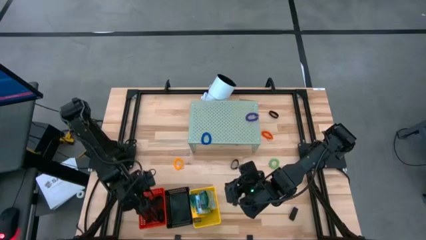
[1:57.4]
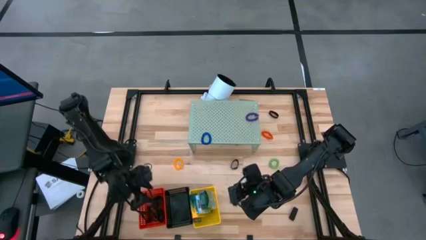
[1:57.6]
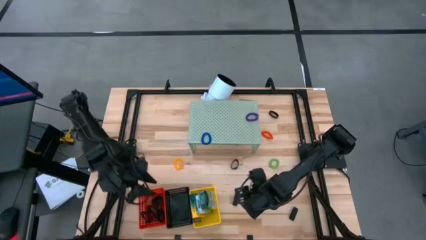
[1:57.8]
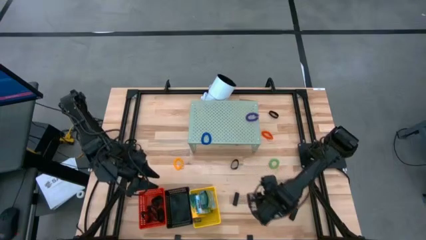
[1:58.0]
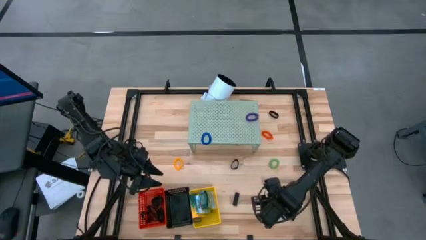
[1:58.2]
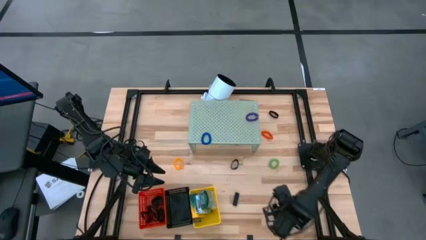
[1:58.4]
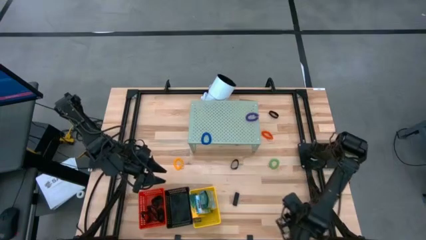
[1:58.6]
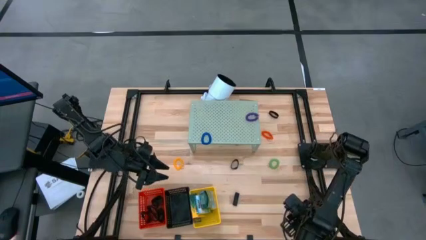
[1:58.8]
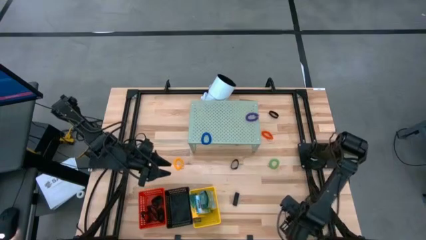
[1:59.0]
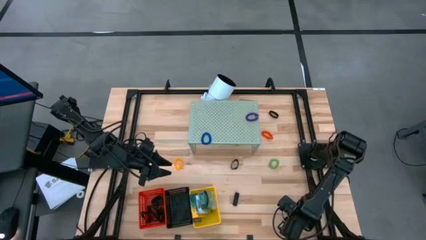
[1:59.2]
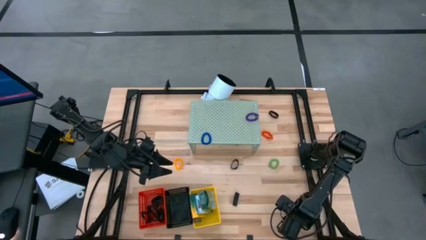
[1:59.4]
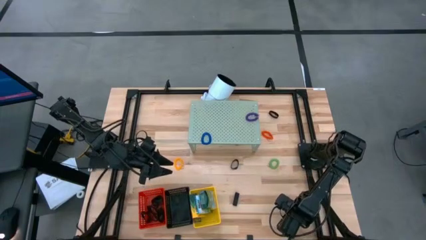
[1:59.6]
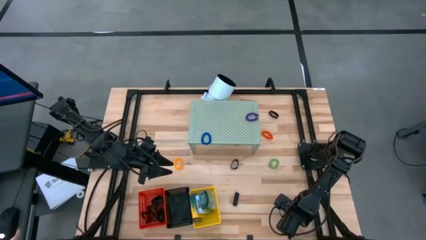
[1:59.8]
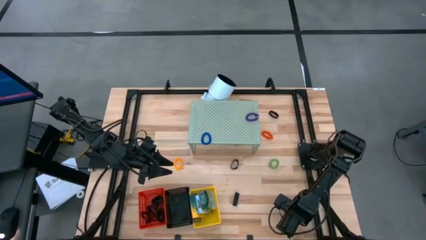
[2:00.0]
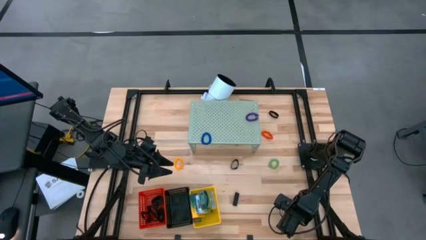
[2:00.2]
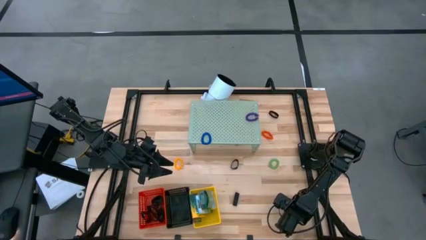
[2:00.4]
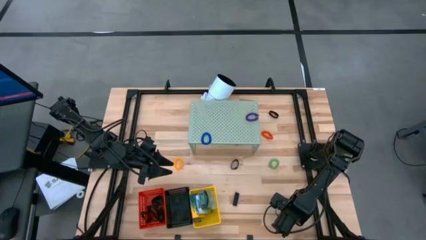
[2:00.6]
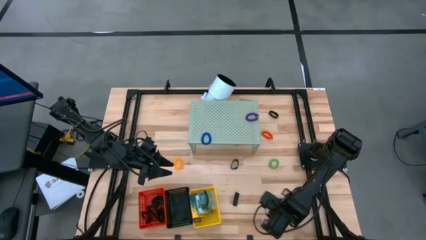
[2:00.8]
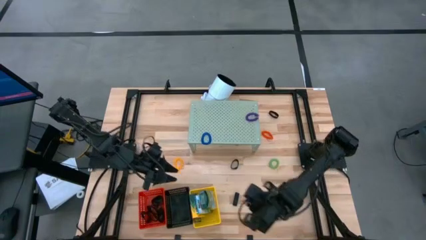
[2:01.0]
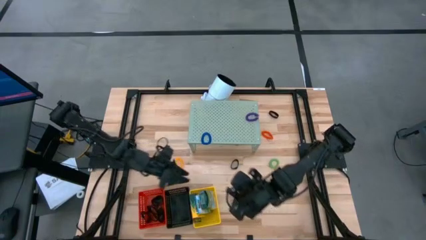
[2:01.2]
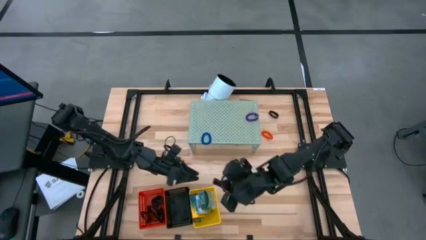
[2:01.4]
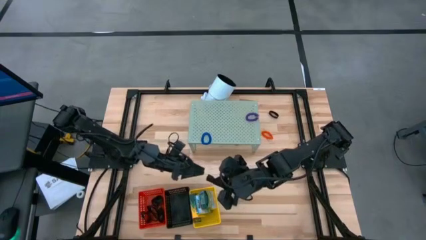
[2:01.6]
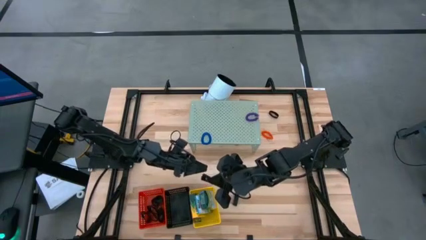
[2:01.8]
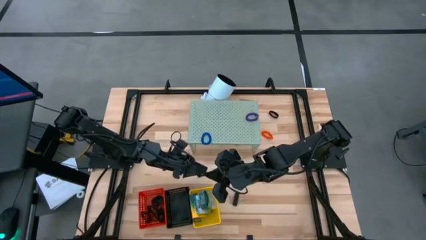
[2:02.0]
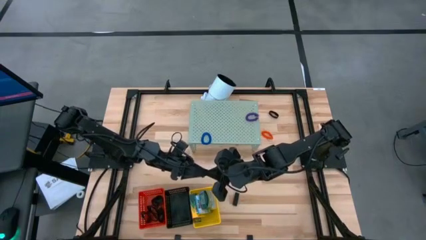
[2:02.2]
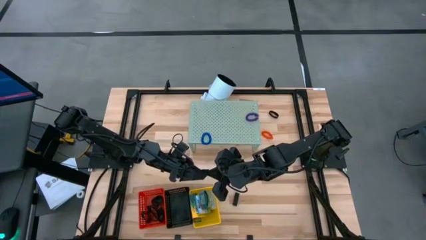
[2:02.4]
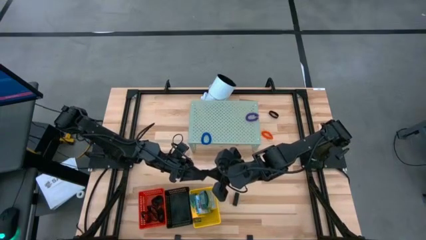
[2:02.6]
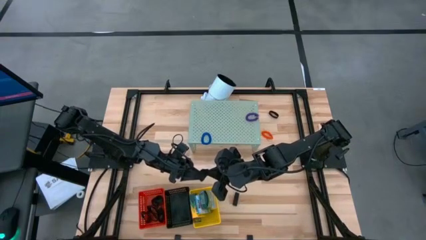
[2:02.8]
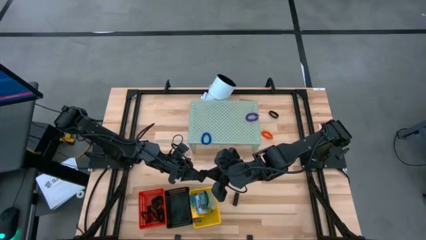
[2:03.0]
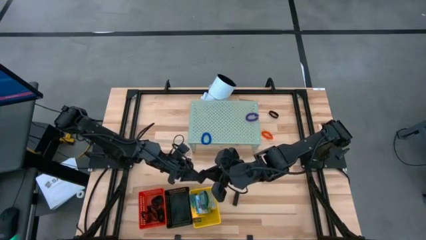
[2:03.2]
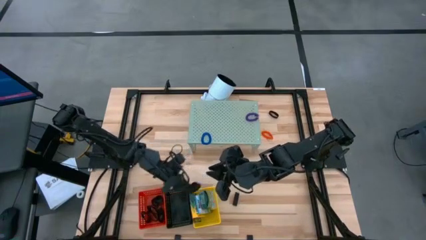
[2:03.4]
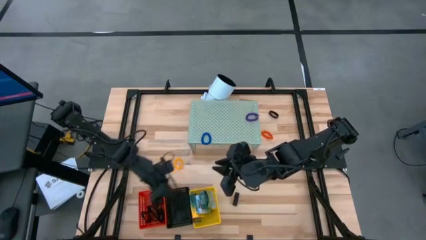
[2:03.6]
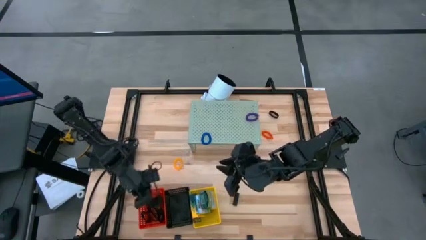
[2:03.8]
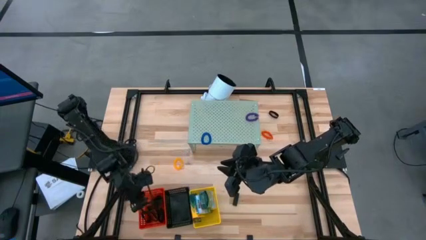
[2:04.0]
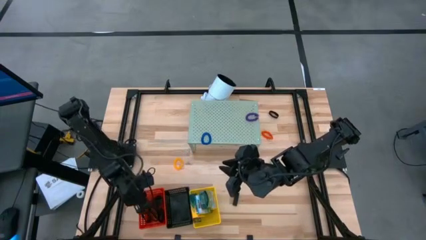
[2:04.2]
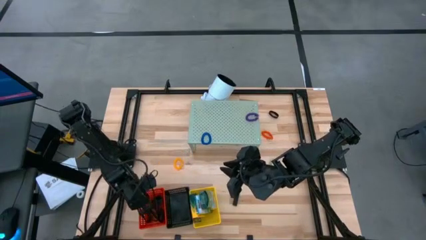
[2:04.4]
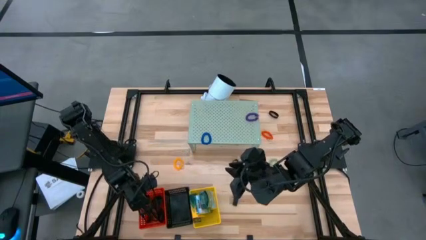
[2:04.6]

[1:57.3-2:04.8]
Task: Pick & Place Office Desk Supplies
Put the black rubber band into the red bin

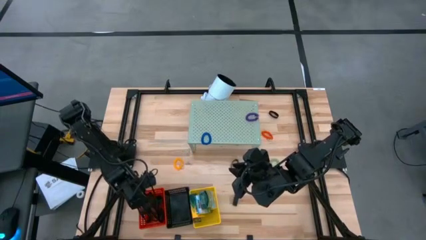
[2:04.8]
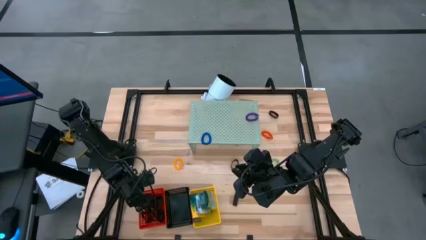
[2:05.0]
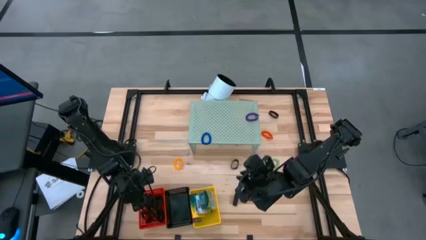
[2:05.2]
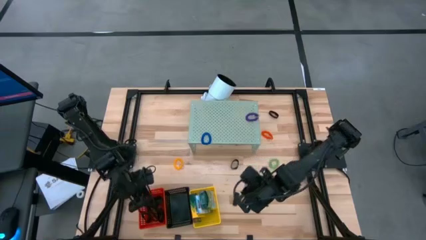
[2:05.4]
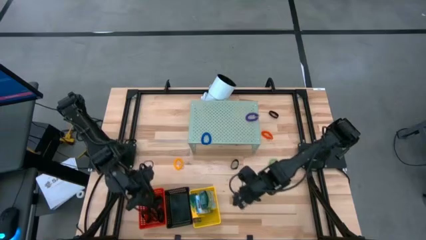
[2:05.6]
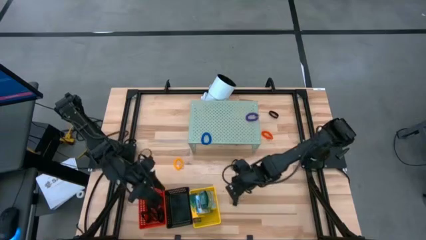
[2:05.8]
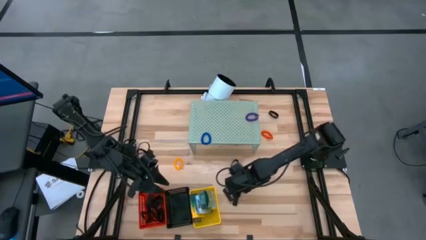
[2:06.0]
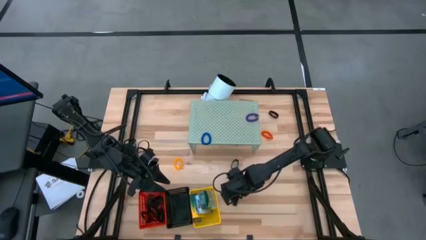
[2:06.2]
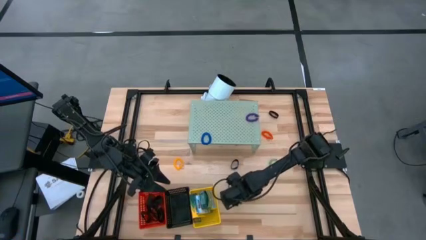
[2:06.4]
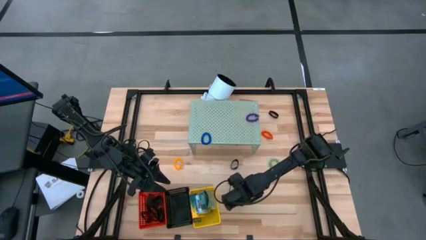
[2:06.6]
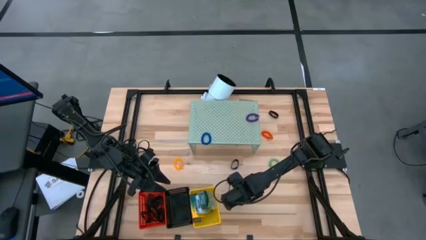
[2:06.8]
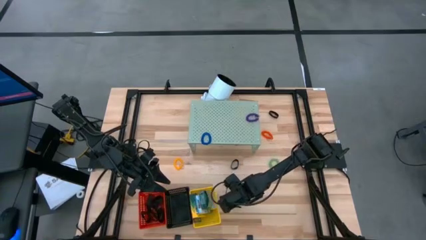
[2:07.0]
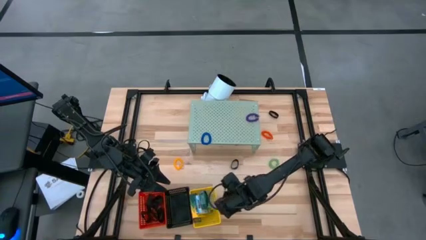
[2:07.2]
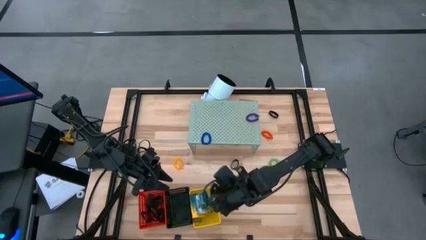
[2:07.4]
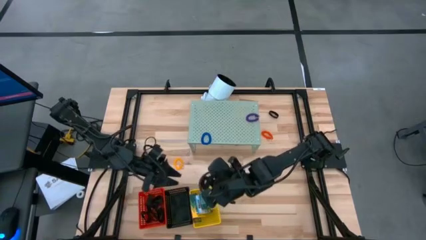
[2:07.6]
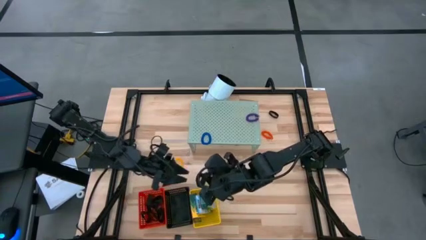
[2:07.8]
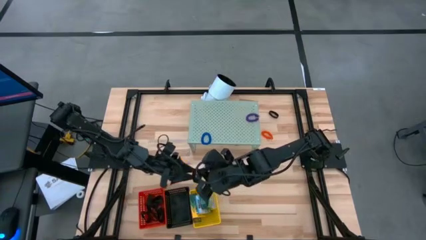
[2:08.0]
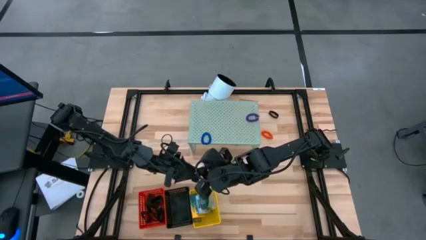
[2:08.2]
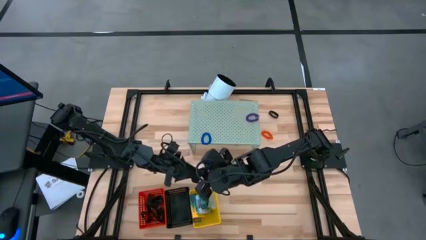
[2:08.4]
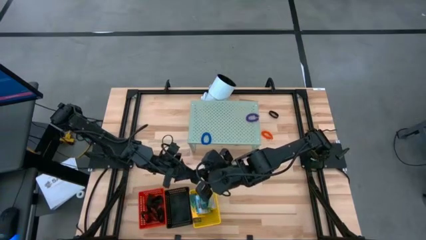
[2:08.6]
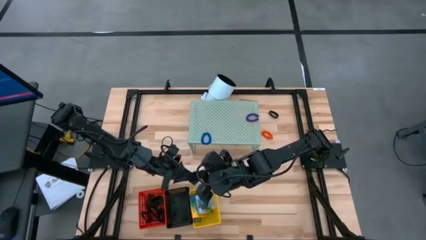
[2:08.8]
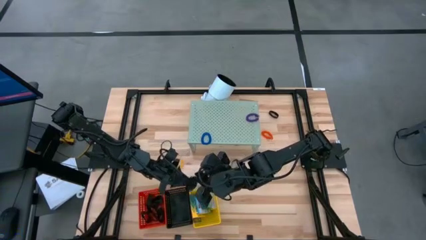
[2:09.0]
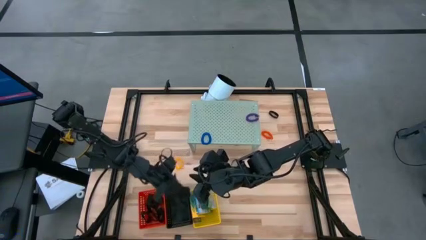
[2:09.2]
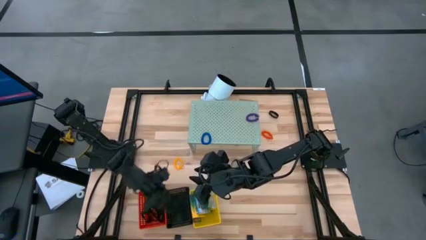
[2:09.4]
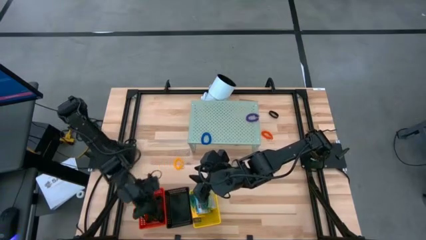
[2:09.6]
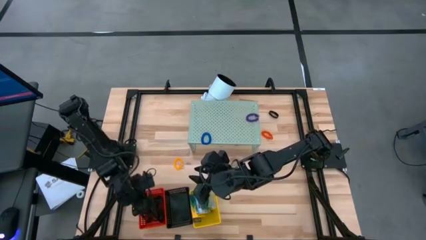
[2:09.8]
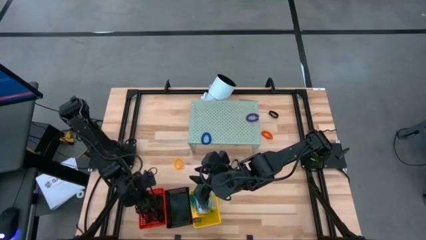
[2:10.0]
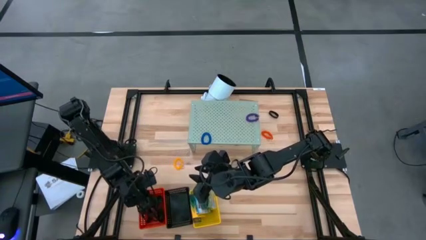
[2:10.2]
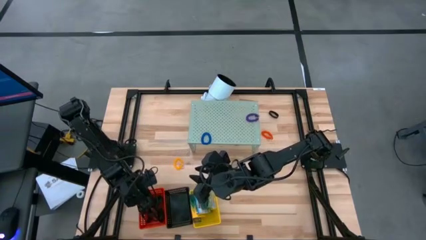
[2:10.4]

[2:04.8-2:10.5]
Put the black rubber band into the red bin

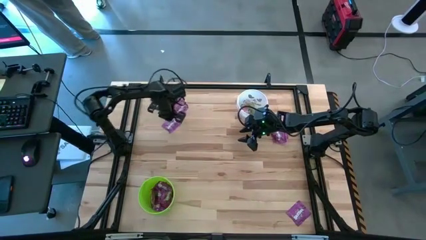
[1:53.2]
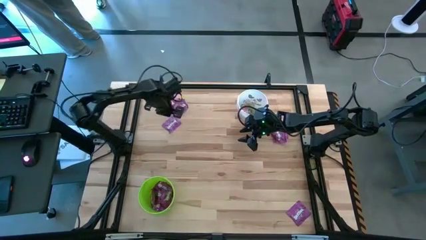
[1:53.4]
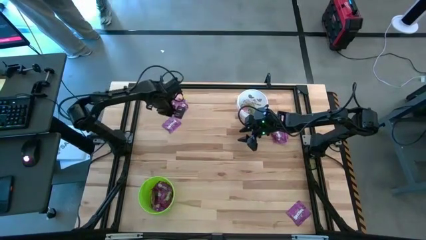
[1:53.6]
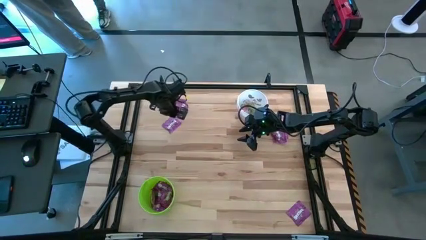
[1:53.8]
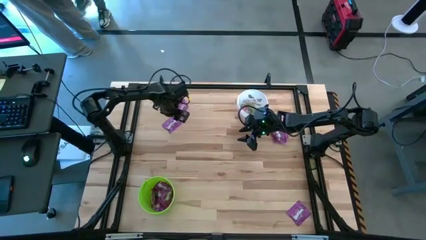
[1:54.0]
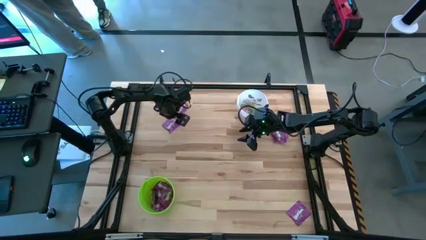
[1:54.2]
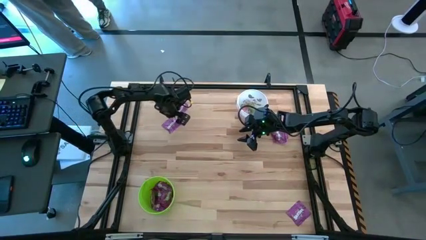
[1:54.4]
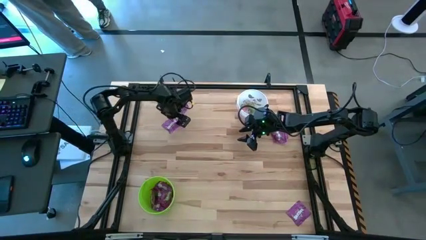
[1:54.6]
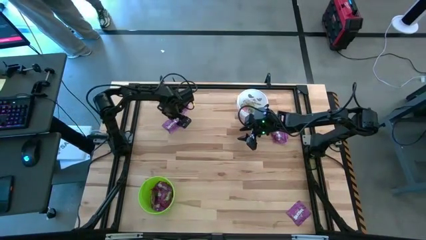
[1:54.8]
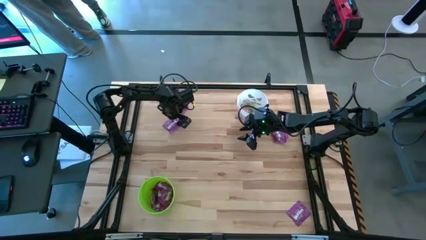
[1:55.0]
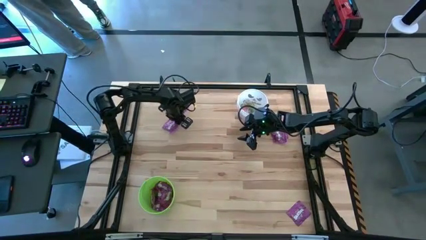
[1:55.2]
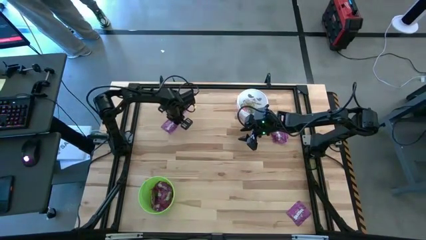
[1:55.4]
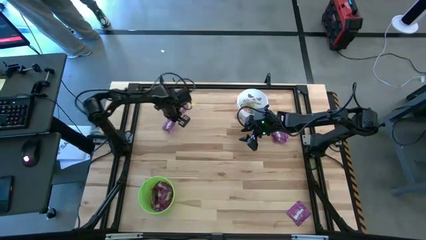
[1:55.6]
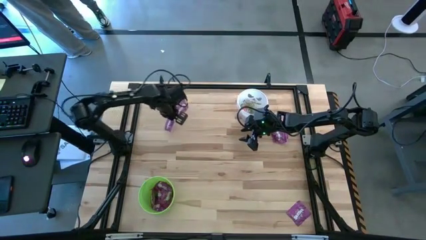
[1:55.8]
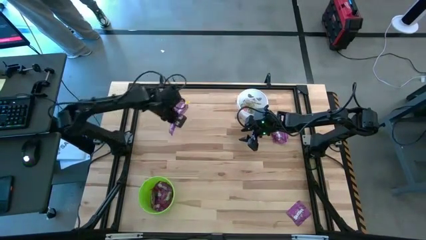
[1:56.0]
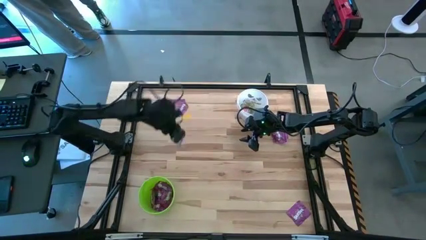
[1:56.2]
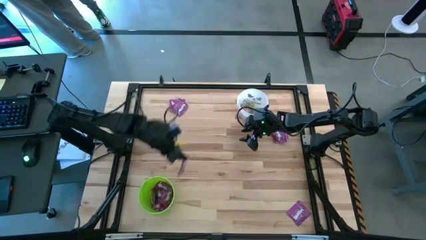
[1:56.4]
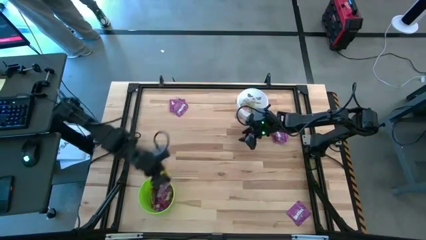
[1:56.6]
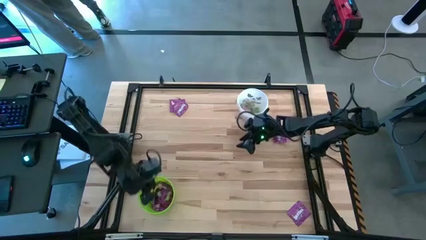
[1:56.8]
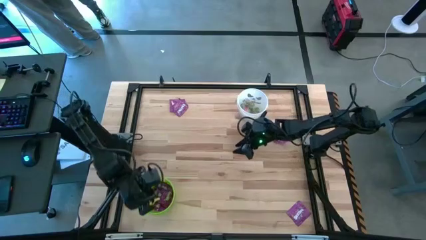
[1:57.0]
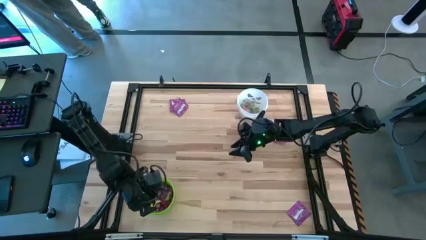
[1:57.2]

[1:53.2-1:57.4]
Task: Sort candy by brand, put in halloween buckets
Put the purple candy into the green bucket
